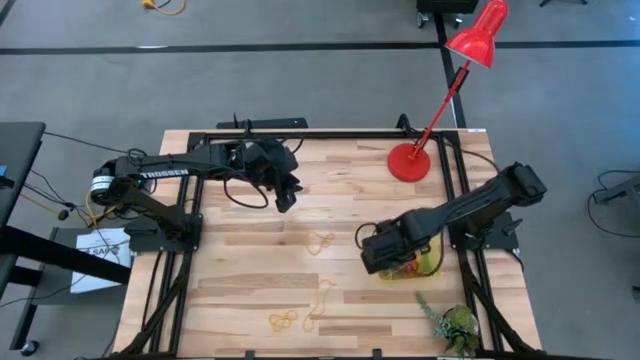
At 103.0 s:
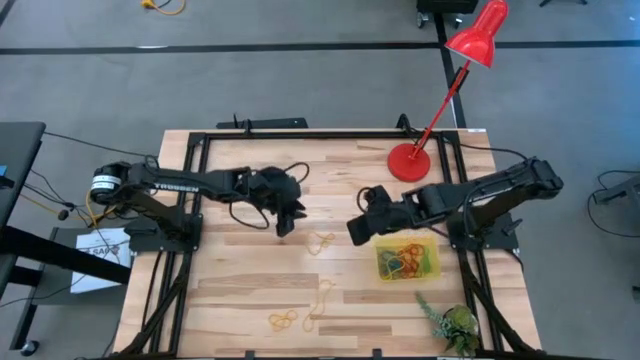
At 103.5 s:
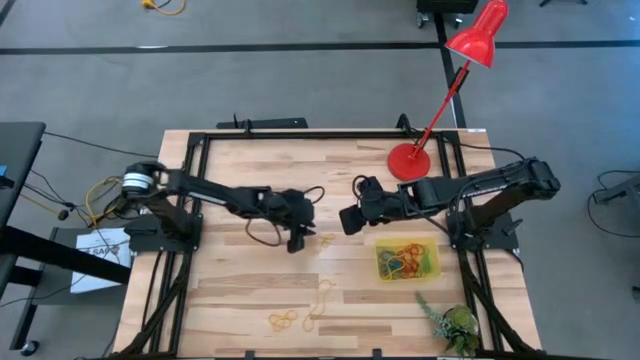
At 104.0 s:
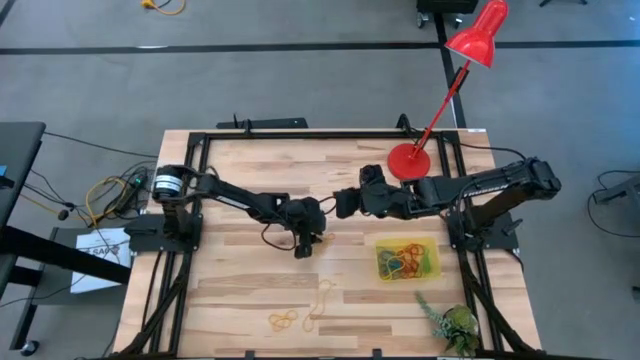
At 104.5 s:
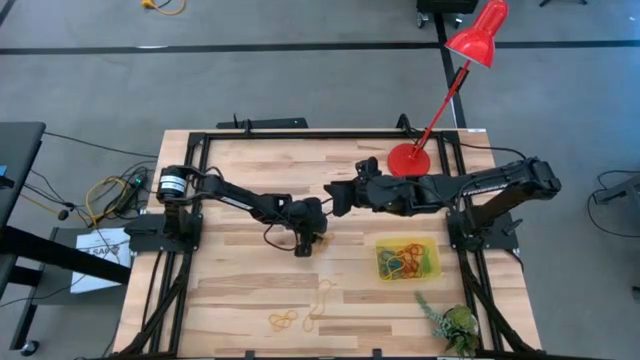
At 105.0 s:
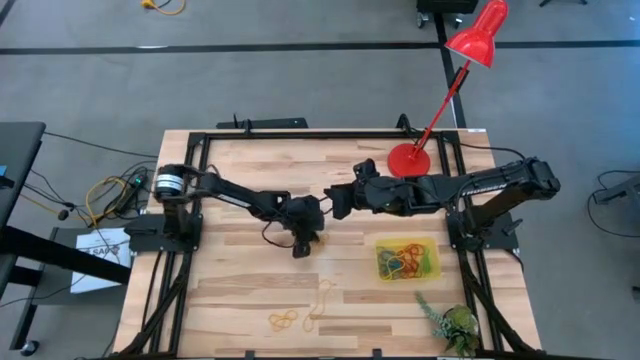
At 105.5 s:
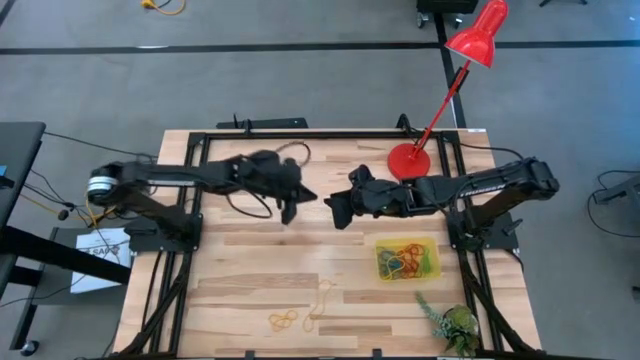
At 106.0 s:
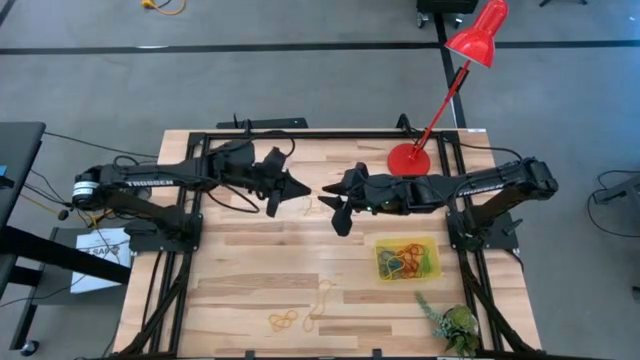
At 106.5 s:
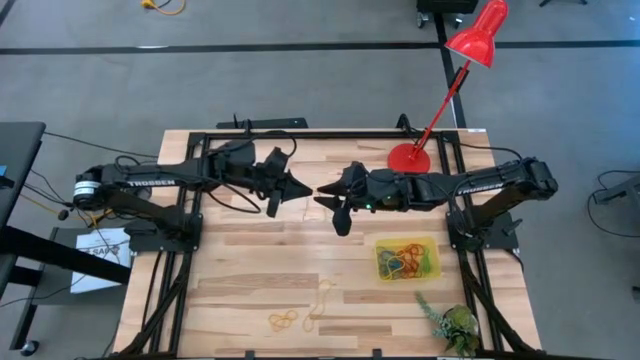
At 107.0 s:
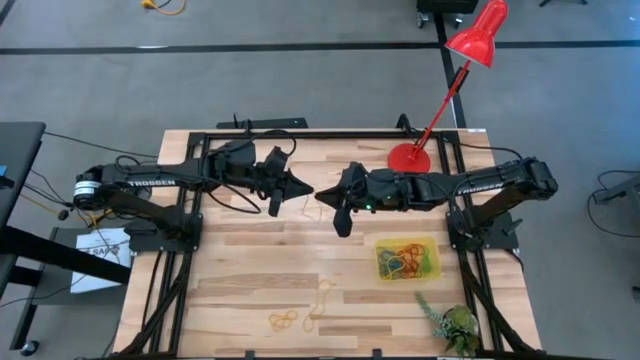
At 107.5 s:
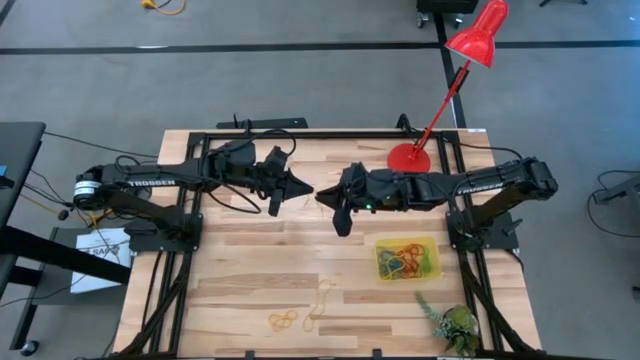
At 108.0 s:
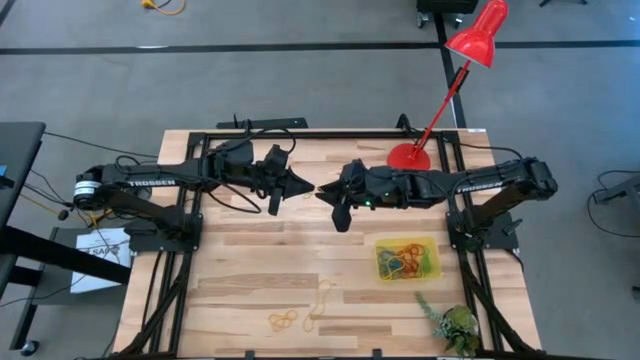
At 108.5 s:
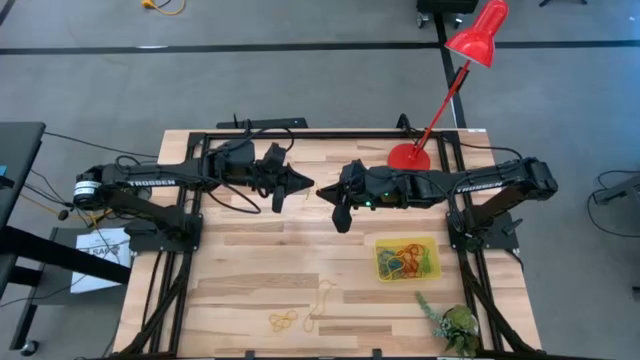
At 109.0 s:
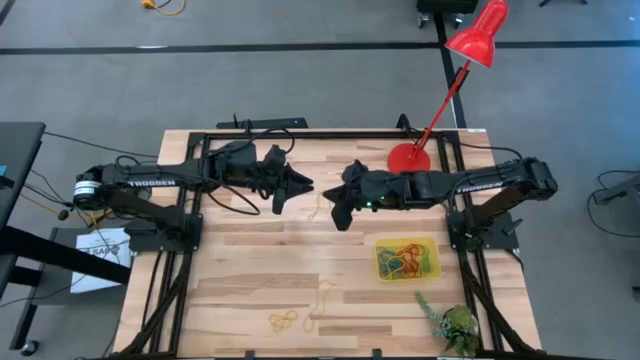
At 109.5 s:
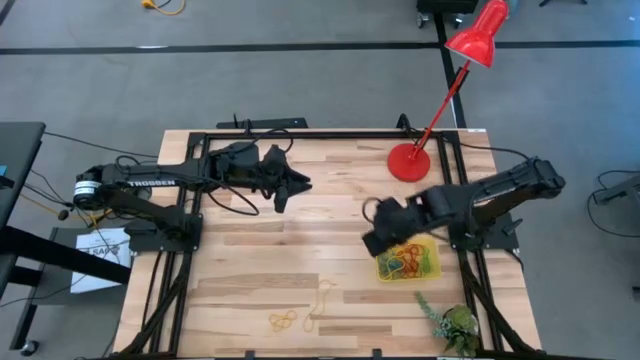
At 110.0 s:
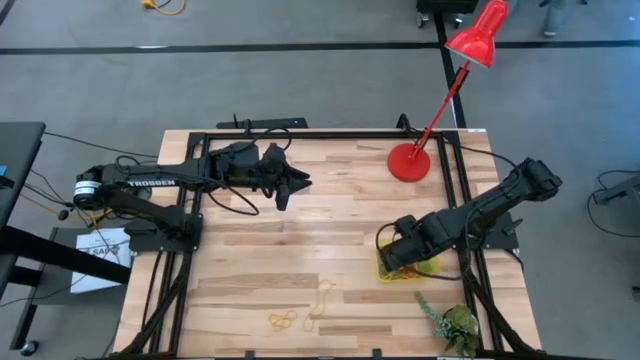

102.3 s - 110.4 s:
Task: Pick and place items into bin
Put the yellow rubber band into the yellow bin

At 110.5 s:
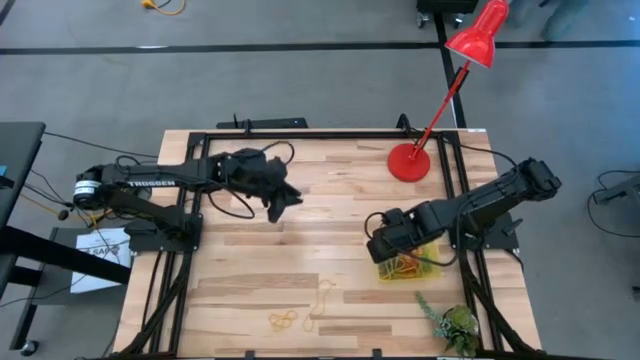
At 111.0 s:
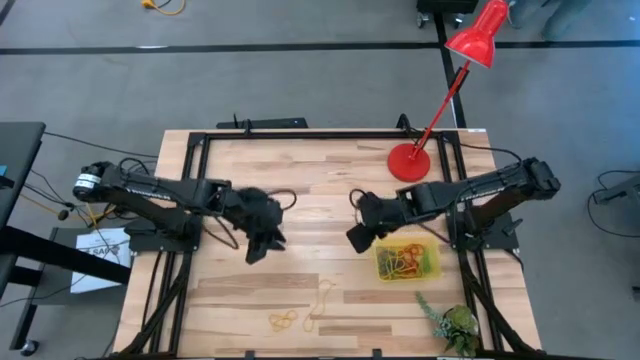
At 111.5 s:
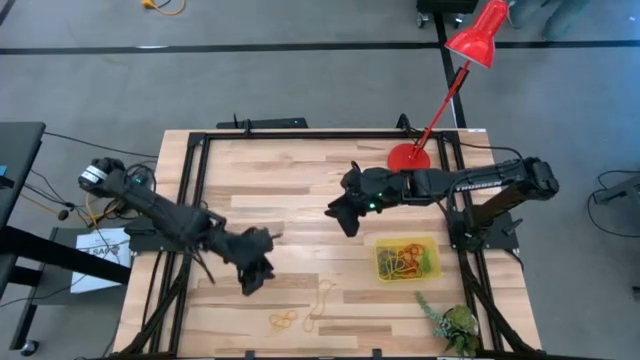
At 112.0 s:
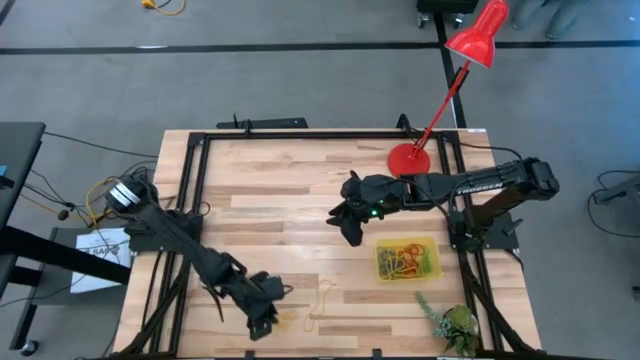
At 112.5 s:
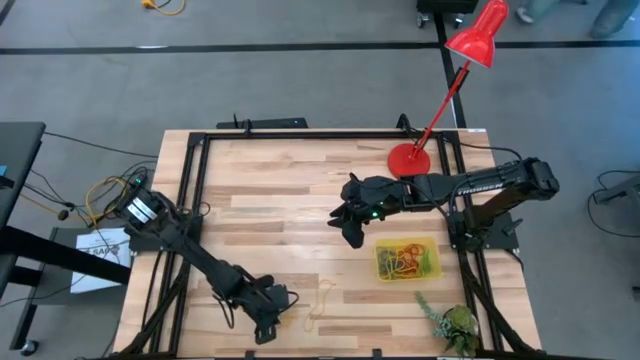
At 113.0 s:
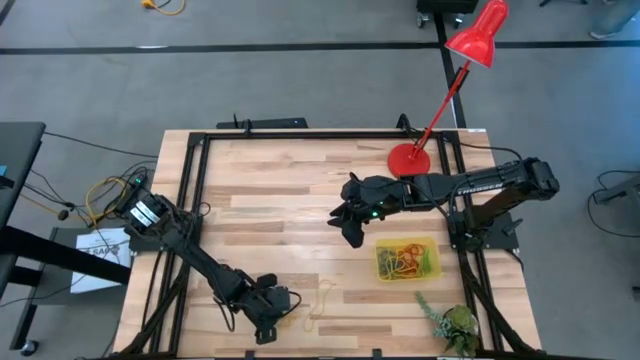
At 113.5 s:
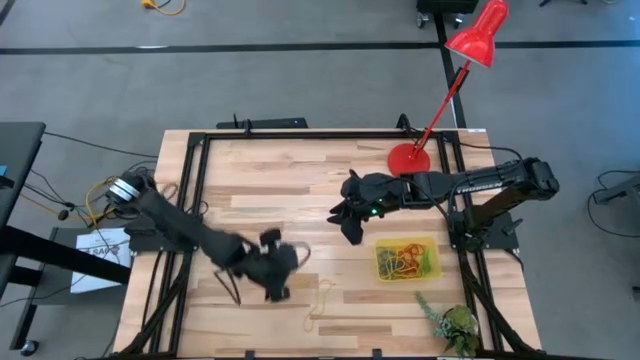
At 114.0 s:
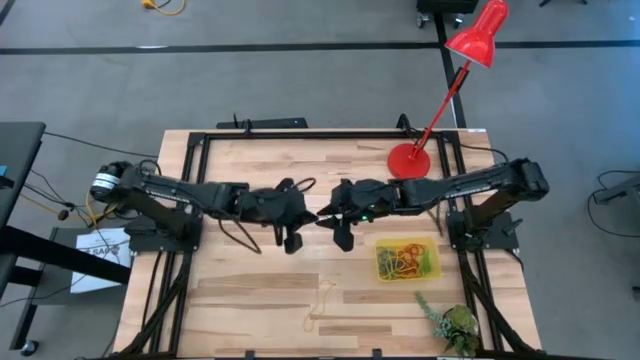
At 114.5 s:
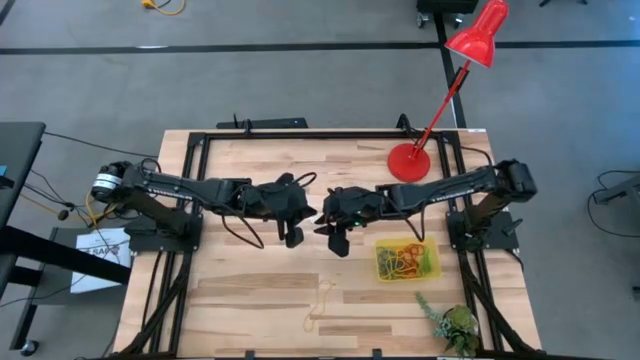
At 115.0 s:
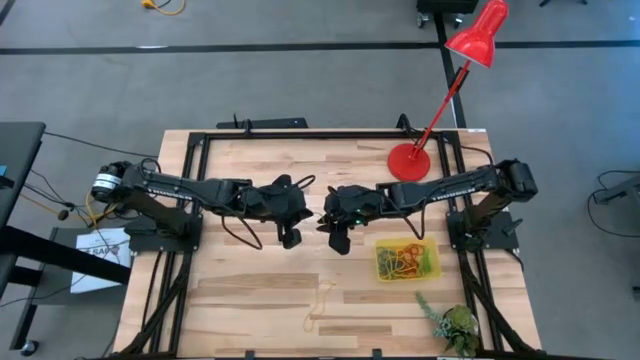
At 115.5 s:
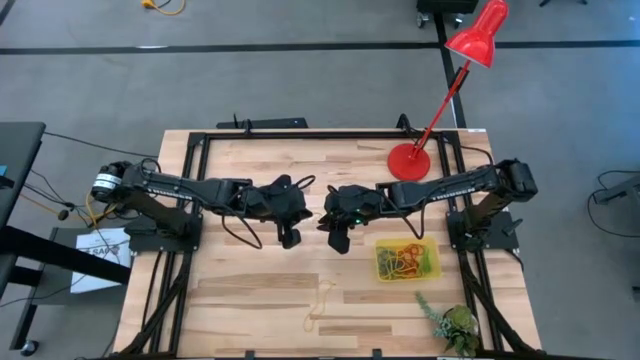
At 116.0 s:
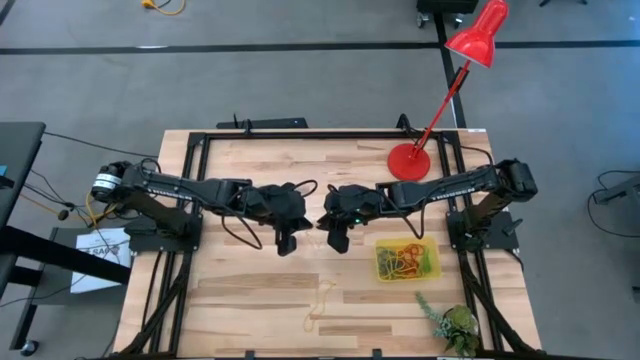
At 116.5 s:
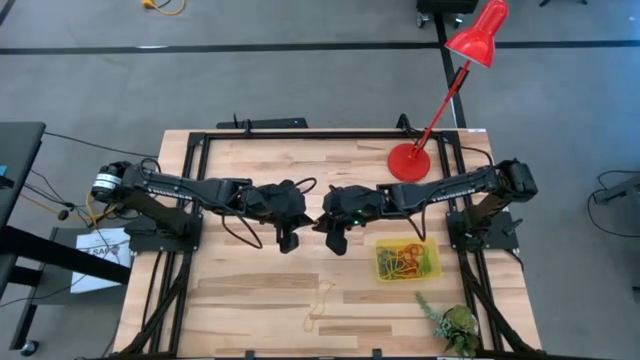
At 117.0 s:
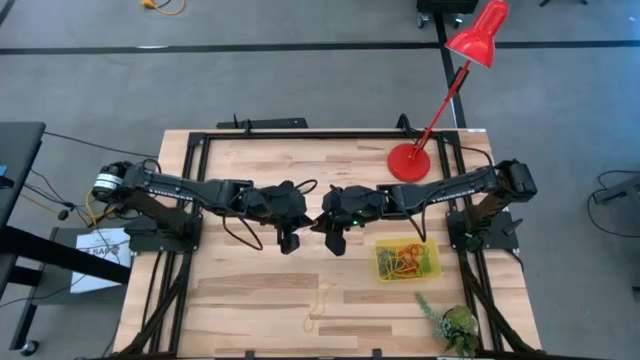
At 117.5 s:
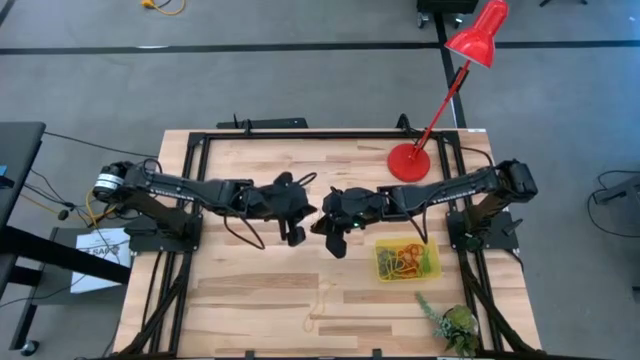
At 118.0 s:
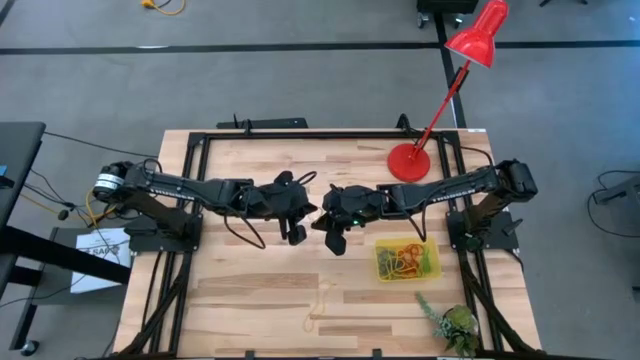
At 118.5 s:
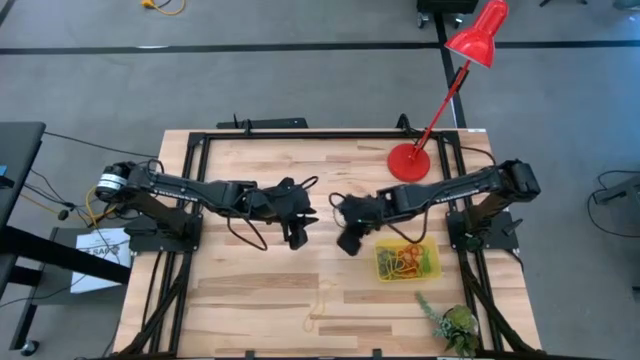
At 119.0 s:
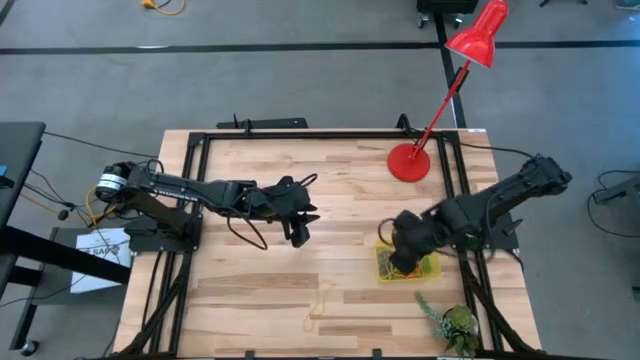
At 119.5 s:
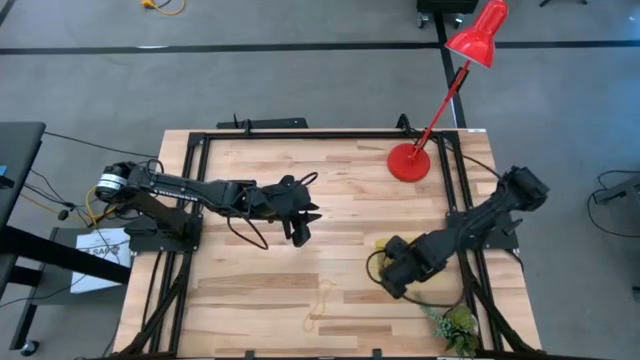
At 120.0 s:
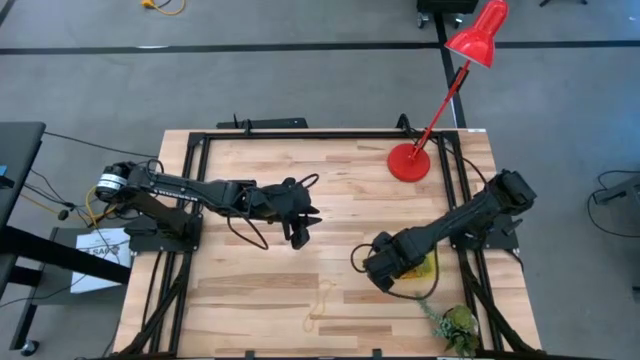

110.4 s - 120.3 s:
Put the yellow rubber band into the yellow bin

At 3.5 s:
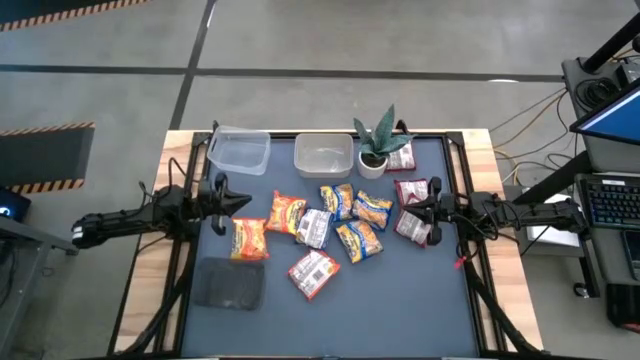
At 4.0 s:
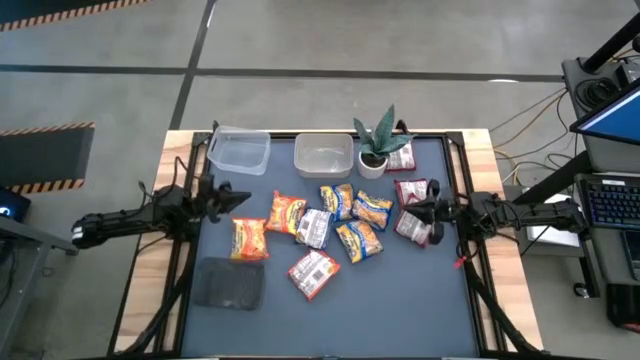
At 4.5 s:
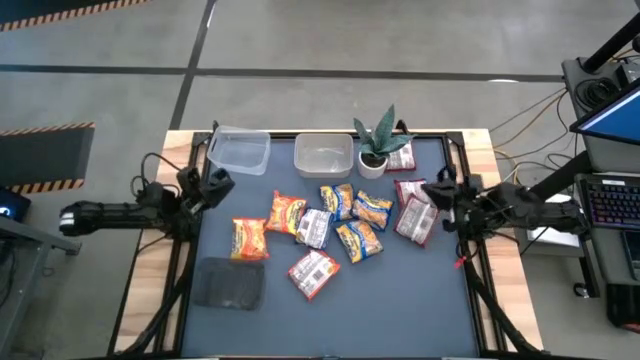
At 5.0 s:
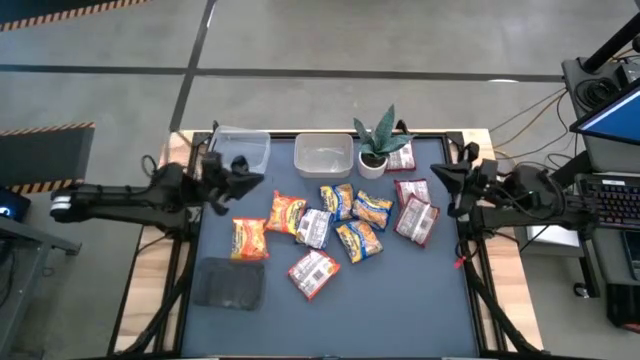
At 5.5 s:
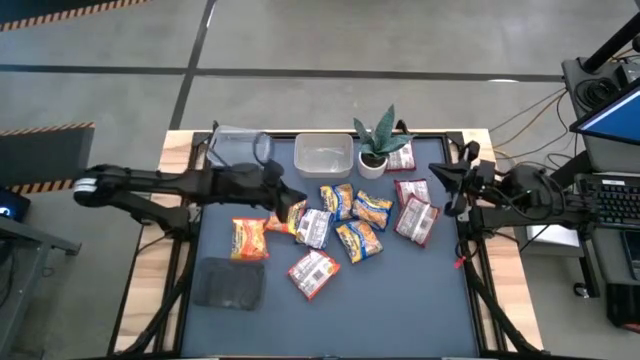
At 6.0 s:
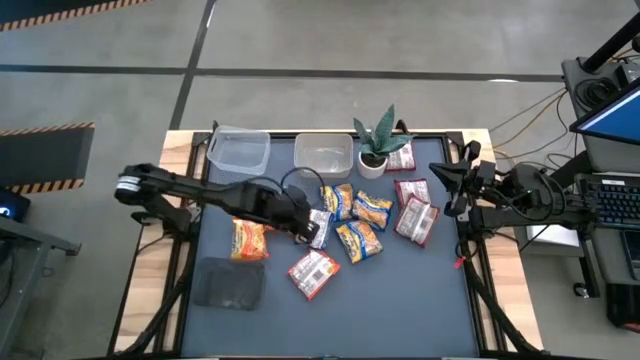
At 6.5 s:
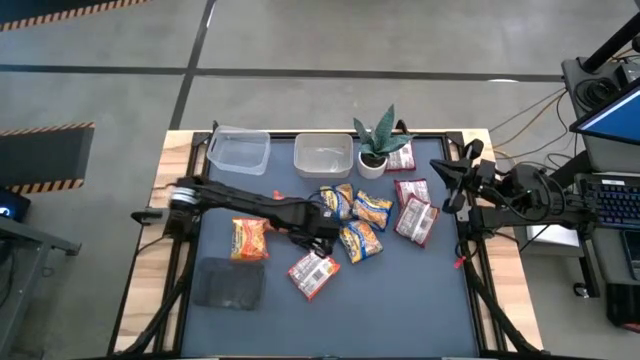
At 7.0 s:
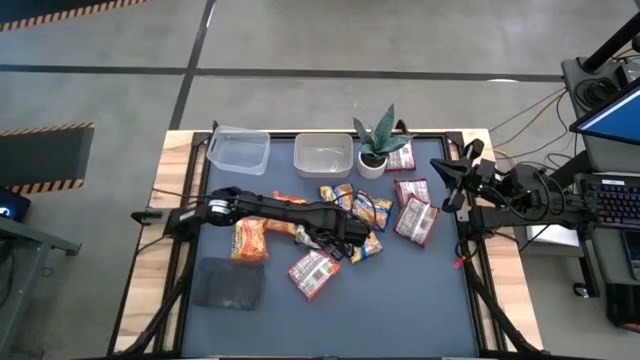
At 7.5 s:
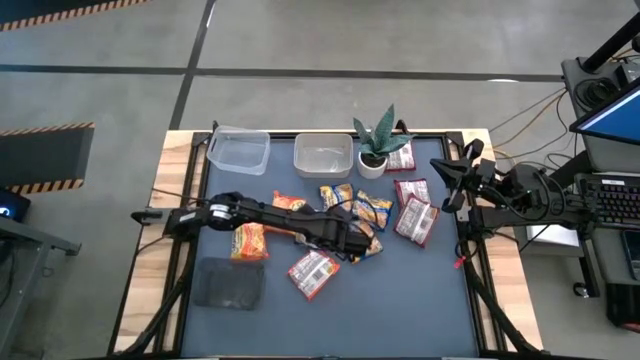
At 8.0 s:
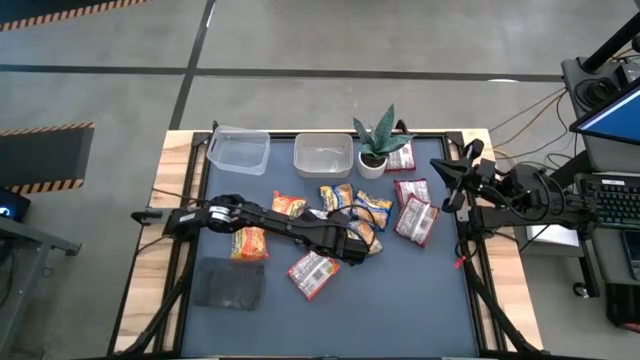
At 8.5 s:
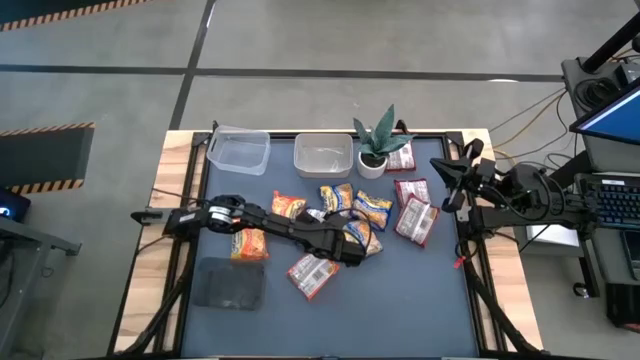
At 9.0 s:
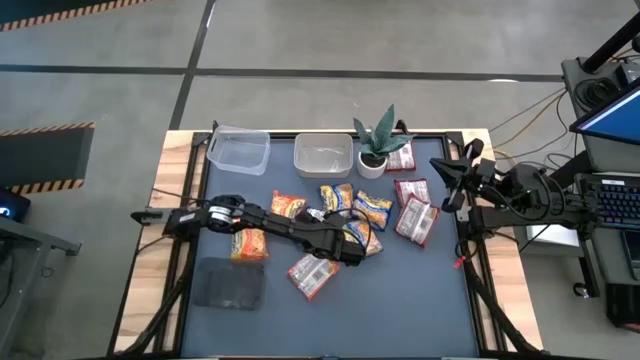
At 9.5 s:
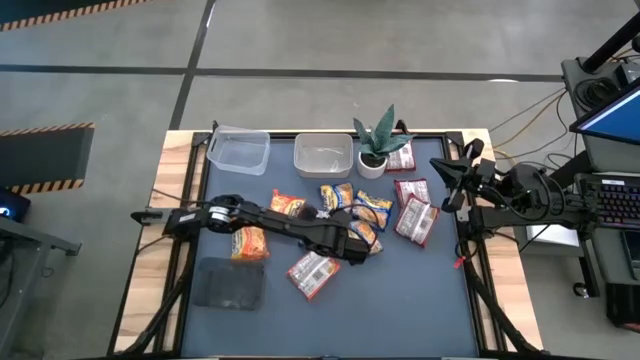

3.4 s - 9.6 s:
Task: Sort Maruchan noodles
Put the blue noodle pack into the transparent bin
